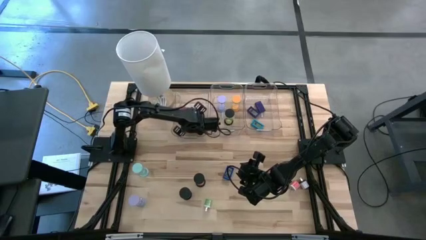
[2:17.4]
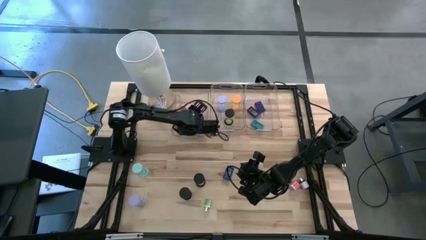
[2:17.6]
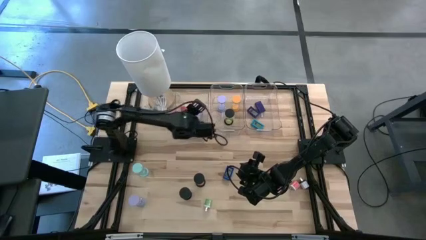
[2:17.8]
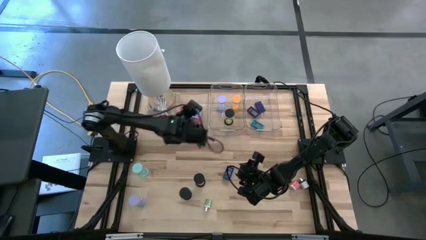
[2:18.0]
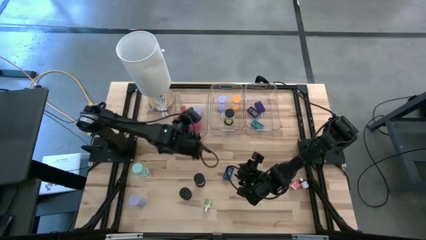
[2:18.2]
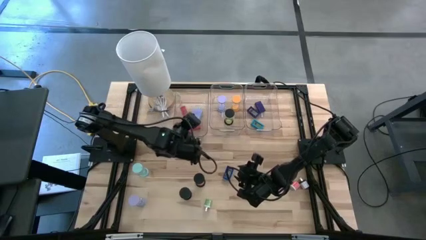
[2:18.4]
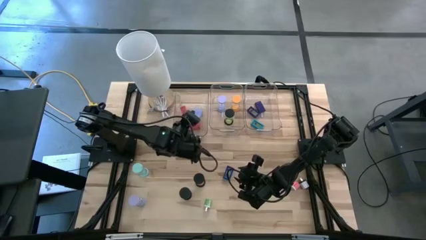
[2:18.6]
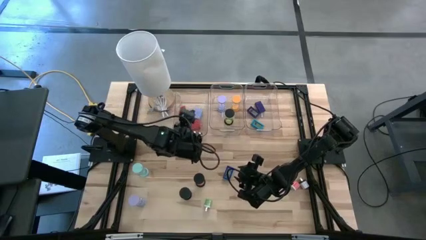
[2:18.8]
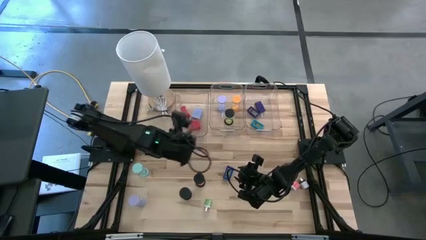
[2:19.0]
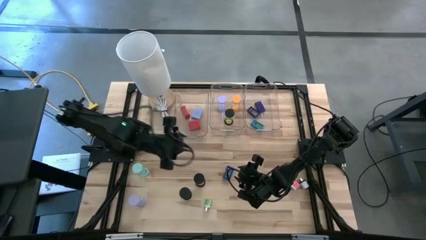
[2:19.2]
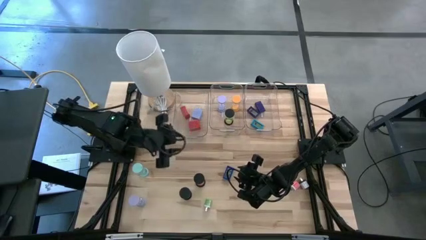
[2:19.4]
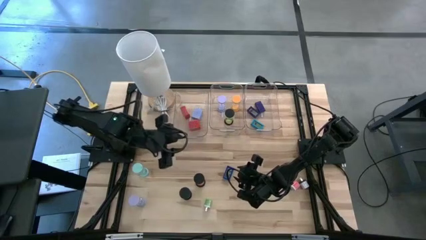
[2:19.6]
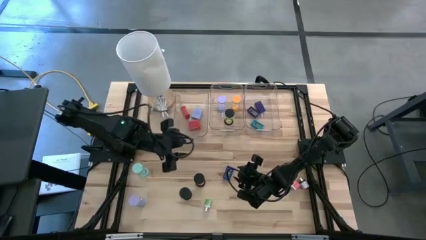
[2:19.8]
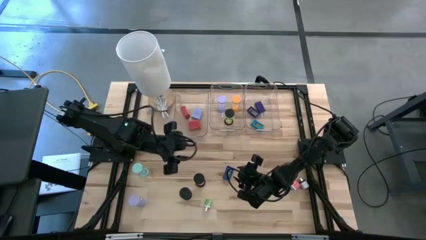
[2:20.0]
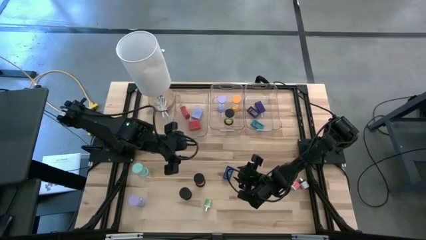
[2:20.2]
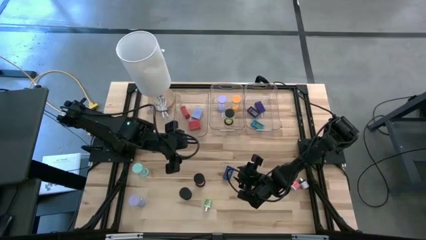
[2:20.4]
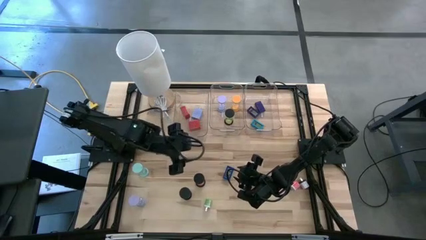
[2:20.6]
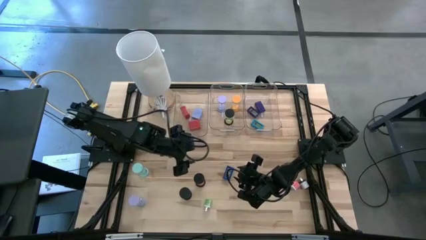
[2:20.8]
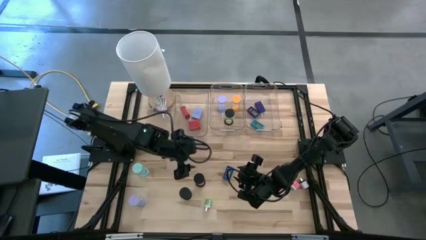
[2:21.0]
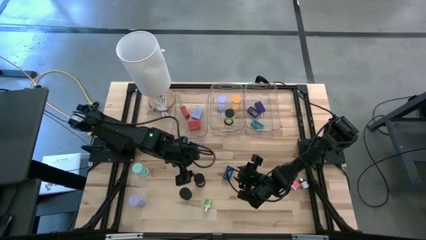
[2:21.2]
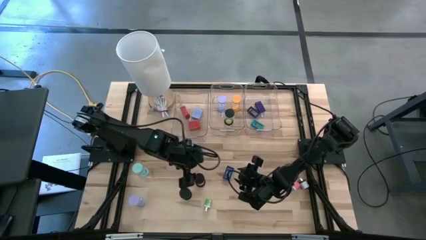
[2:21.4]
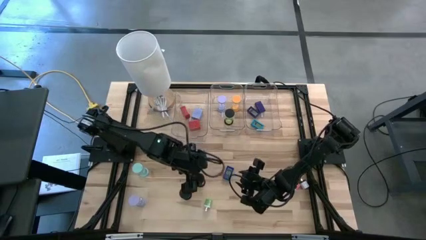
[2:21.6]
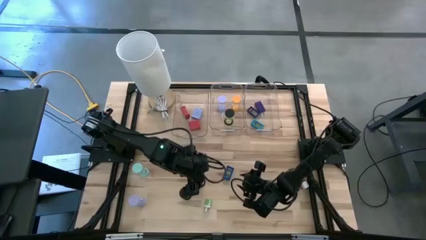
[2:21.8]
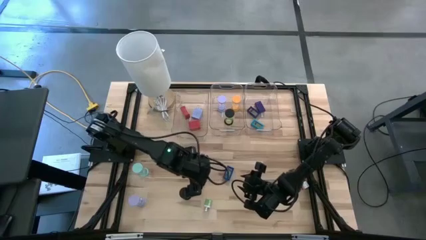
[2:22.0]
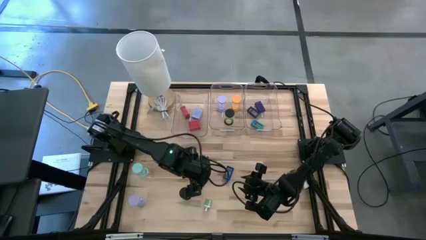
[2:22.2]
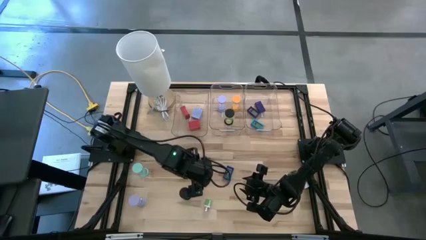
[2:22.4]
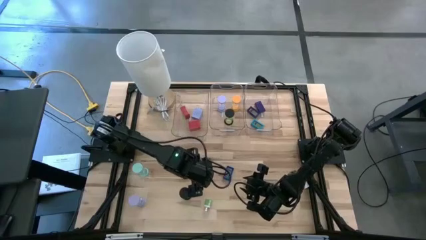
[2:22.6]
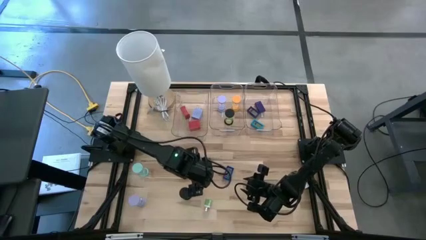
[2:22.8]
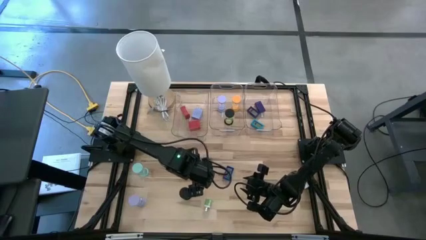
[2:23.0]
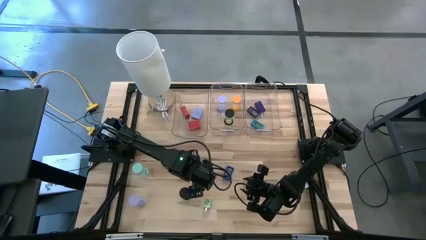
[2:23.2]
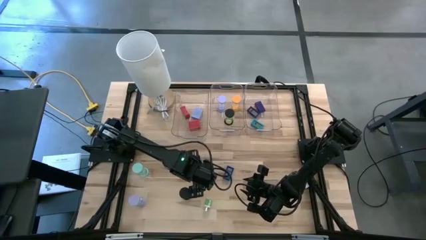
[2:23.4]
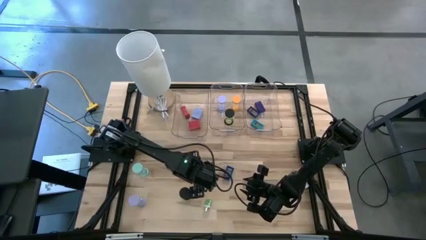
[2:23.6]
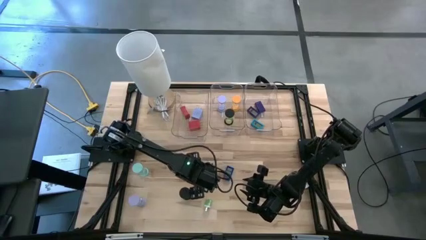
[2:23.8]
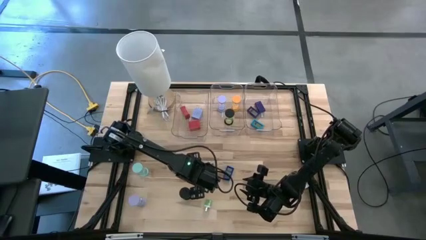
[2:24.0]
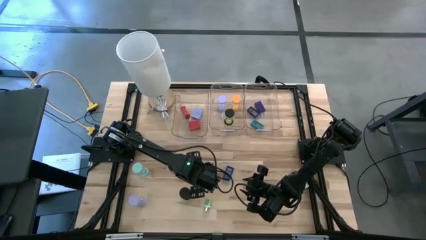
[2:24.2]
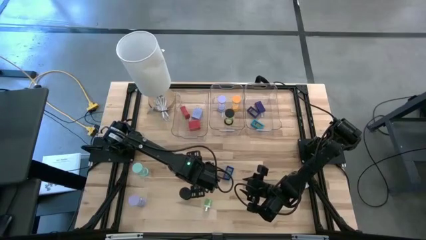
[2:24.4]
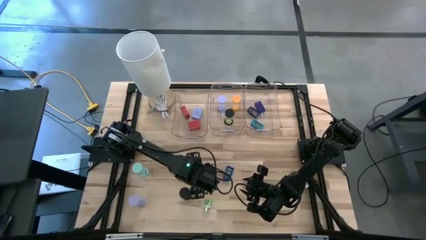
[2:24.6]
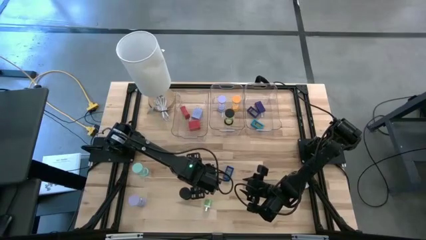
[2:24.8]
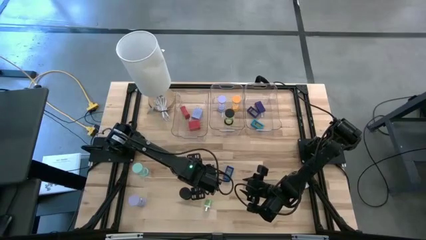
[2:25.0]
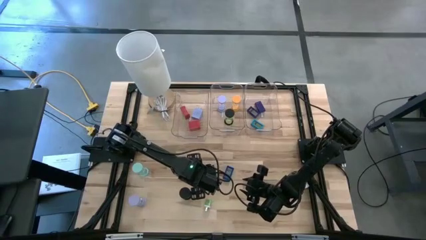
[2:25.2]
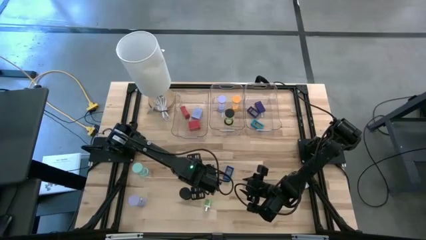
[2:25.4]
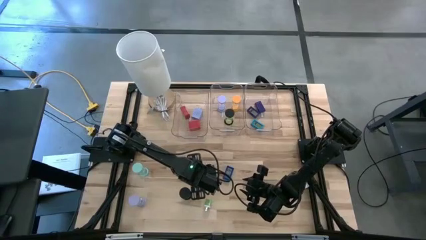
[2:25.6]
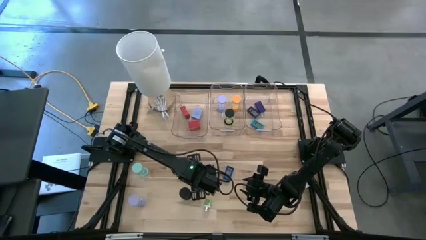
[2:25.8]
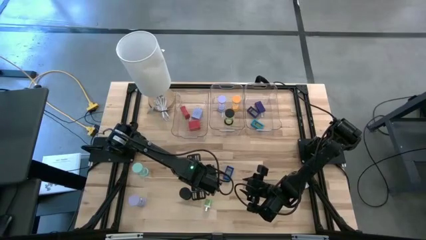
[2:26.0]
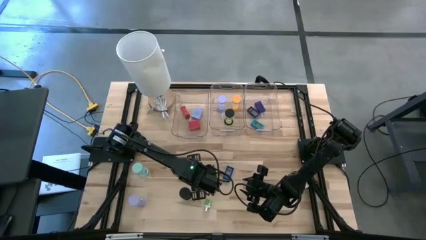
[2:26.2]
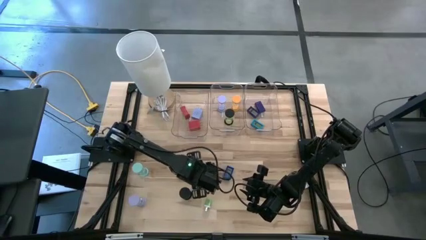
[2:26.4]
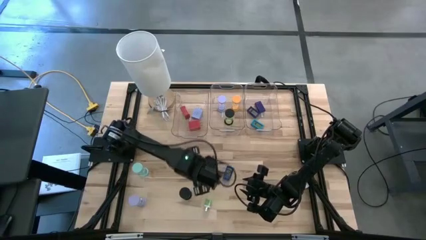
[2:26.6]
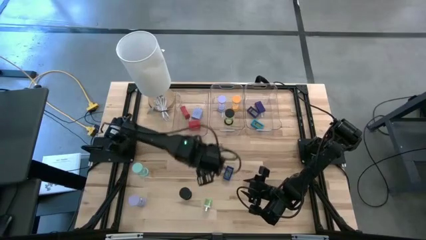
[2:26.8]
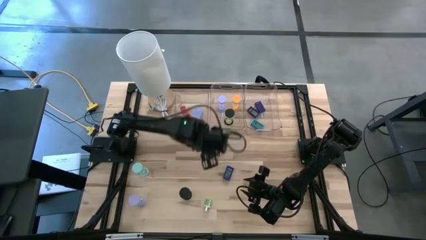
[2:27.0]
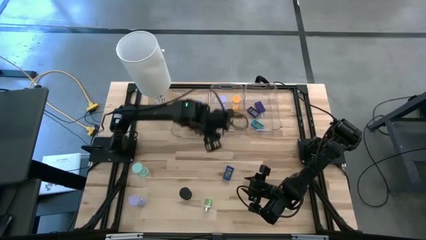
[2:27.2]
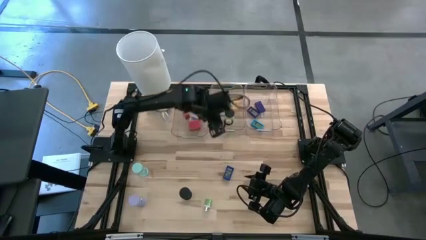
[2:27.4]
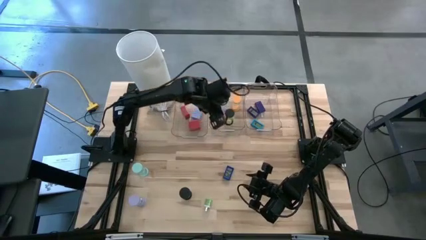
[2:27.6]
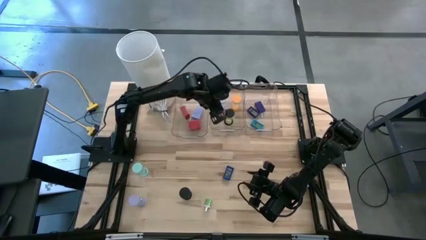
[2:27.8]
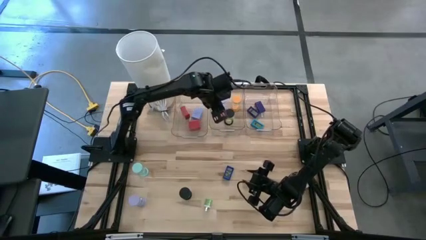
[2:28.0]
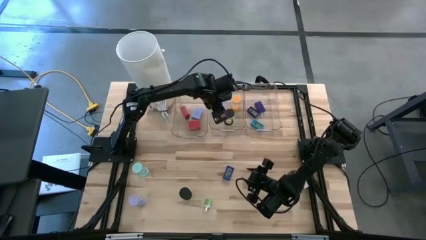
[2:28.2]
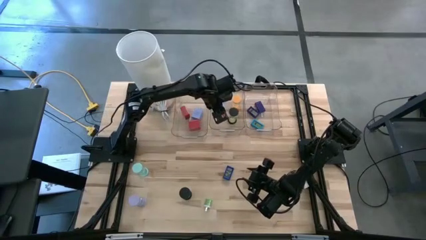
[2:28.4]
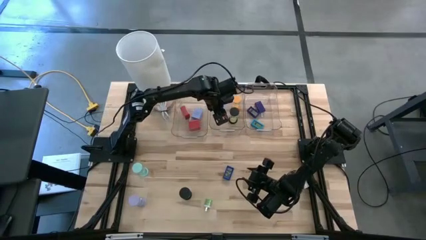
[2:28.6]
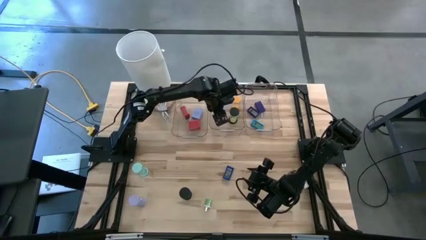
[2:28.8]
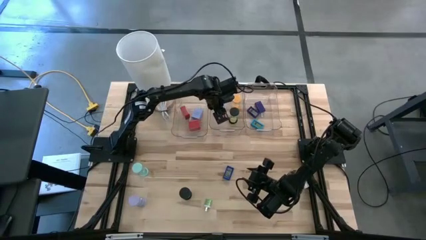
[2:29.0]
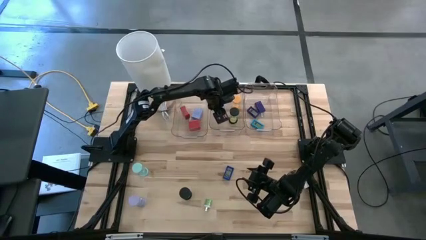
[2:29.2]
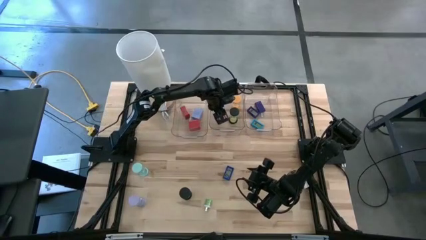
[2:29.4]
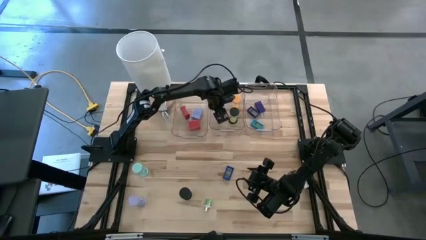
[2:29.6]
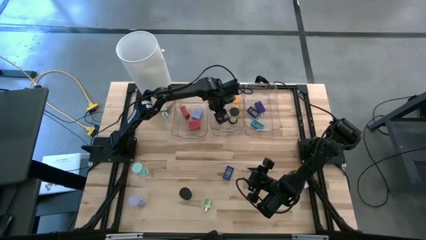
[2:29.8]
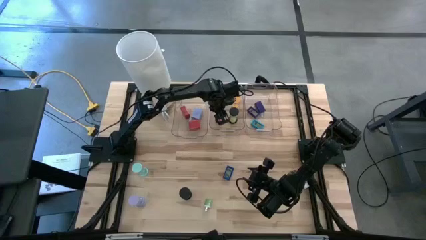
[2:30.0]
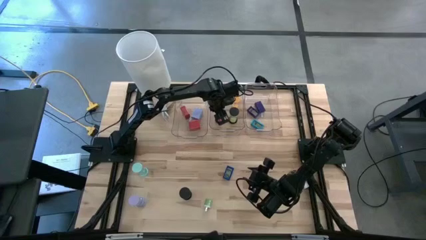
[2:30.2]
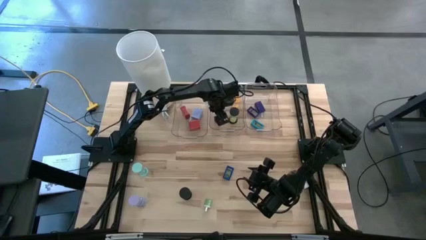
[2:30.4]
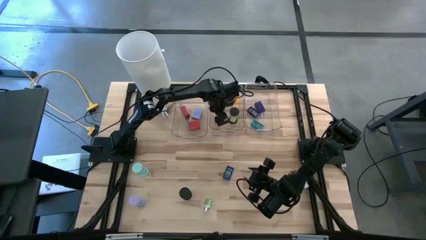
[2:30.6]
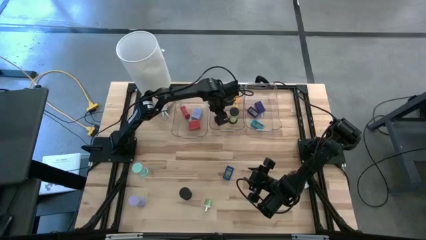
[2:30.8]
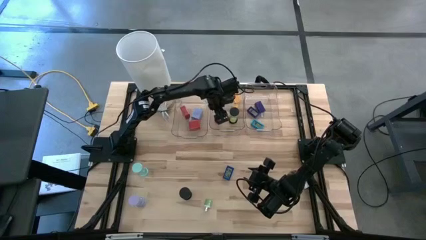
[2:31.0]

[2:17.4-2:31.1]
Task: Pick & Place Office items
Put the red hourglass into the middle transparent bin
